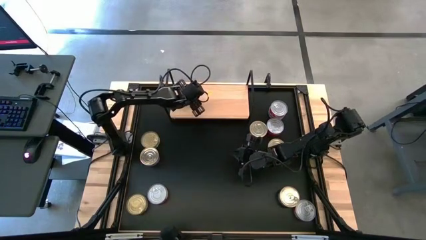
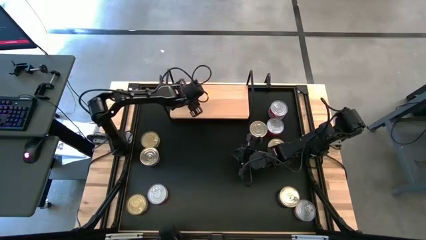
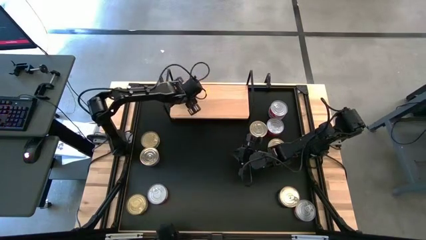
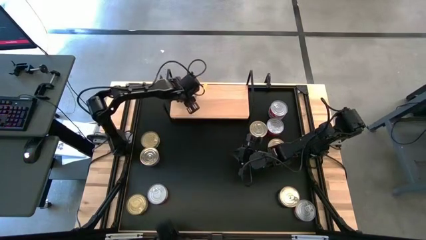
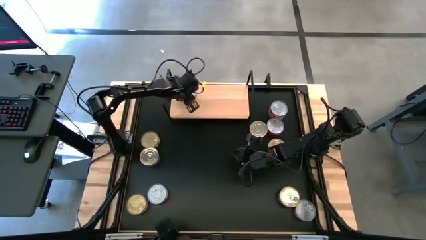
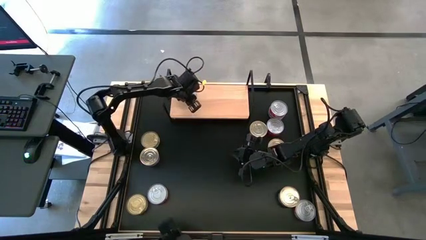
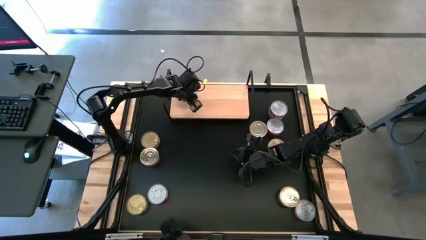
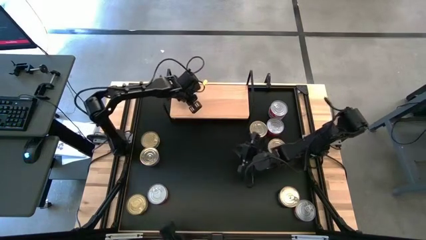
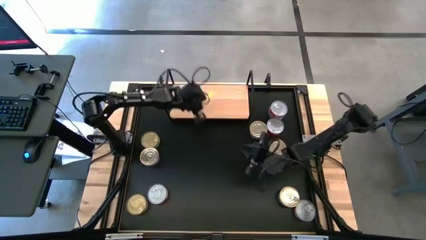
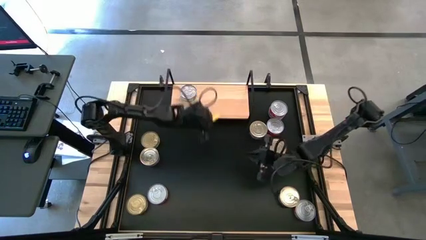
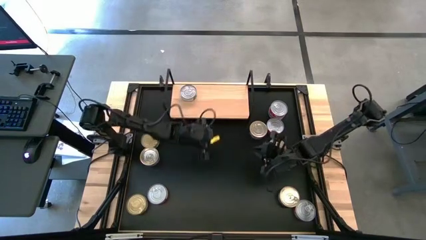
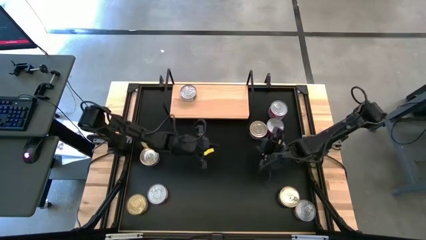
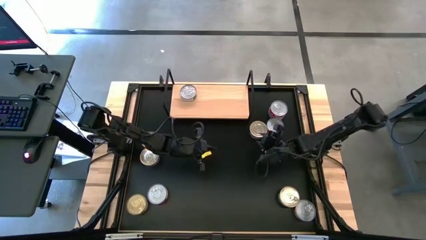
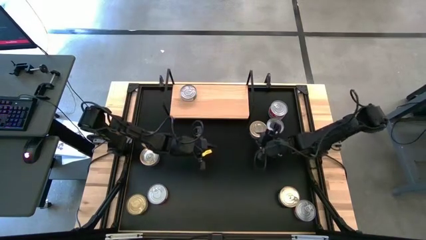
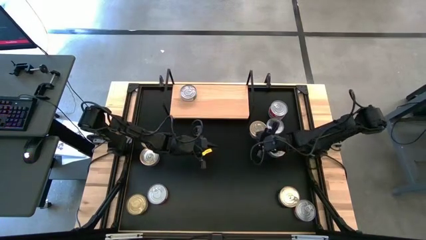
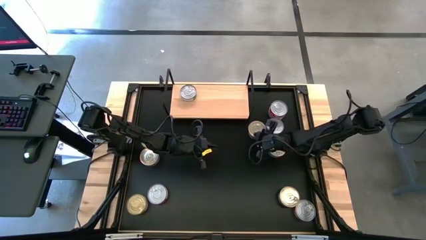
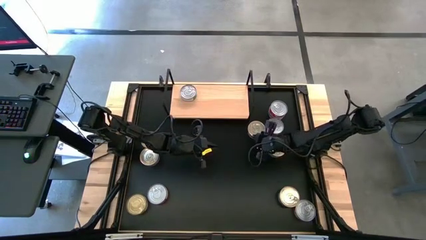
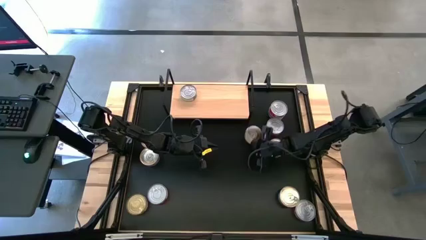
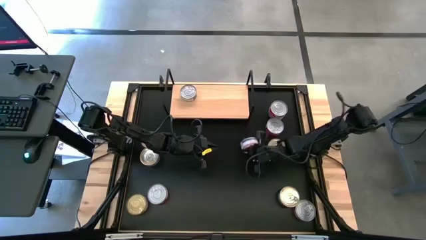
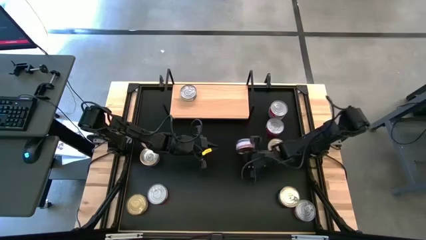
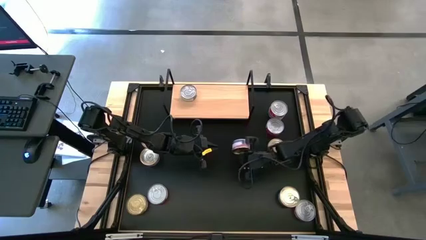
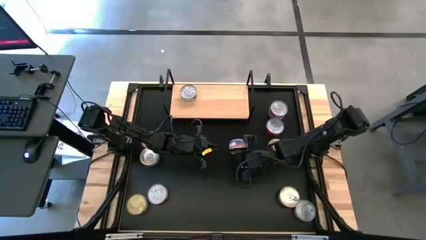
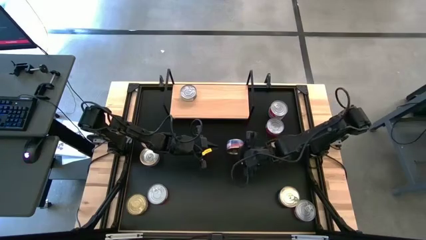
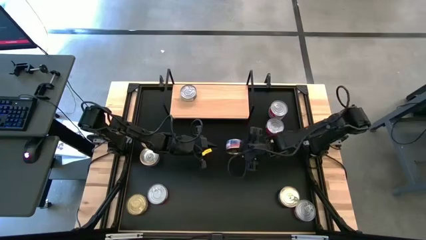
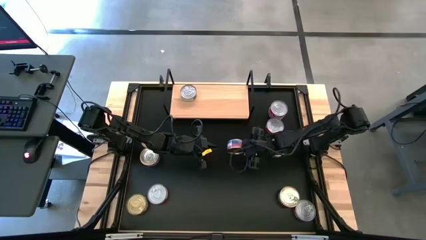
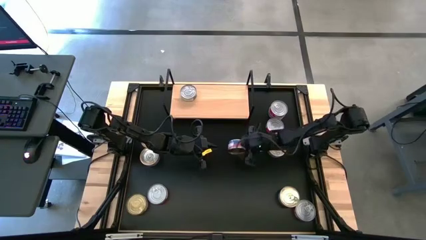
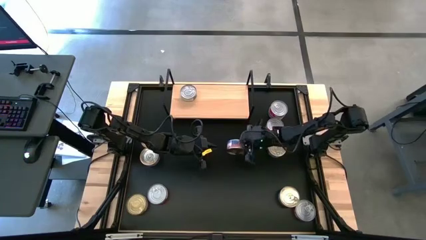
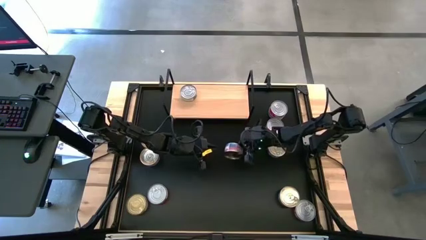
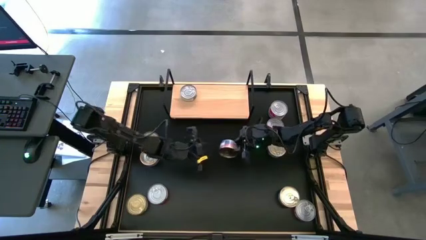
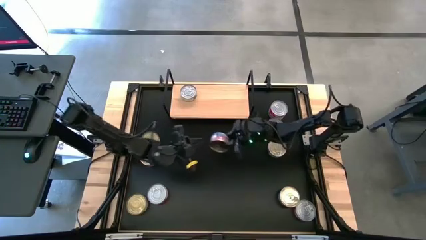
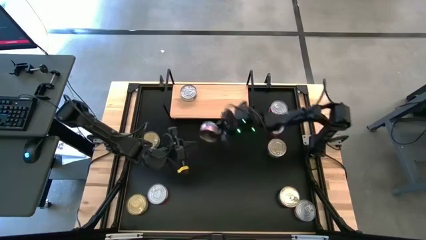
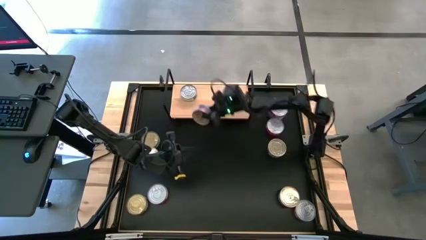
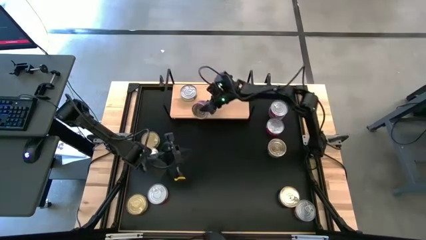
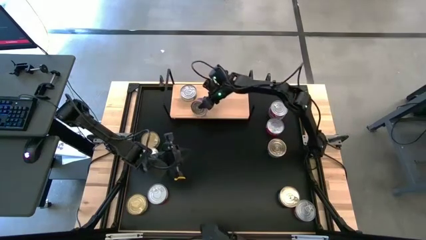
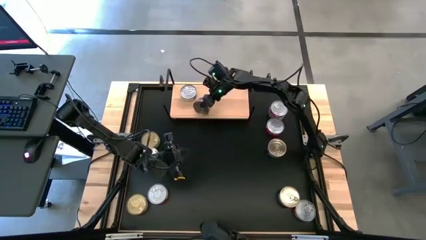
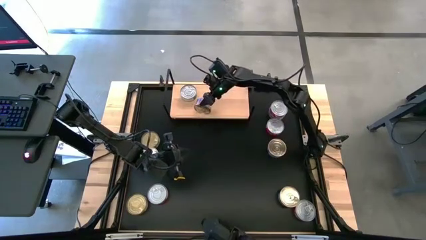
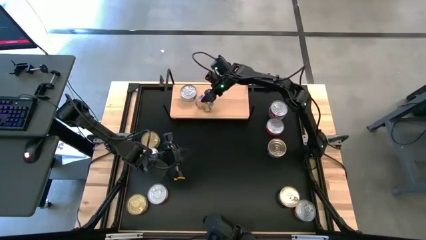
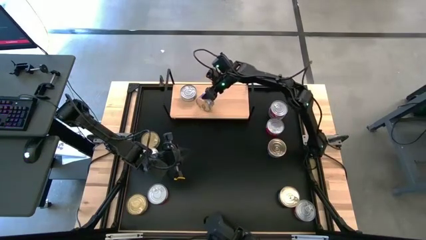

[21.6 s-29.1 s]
Task: Stack canned seafood by type on shelf
Put the blue-pink tuna can on the shelf

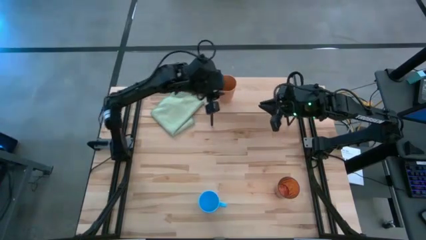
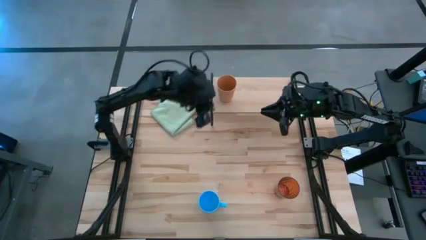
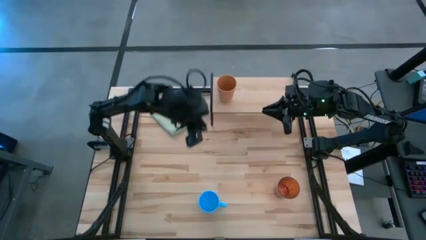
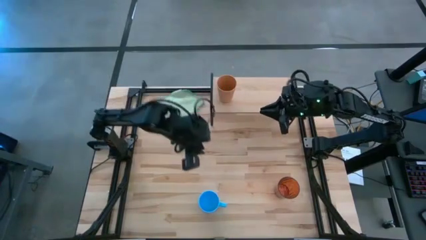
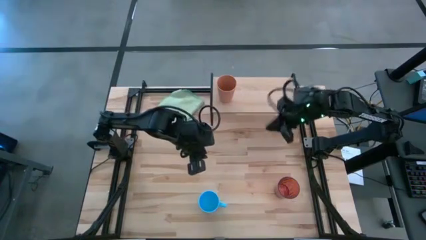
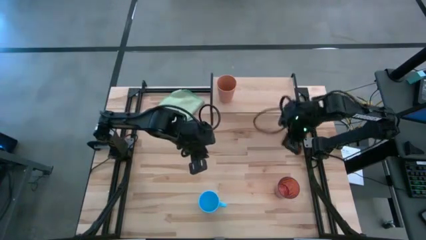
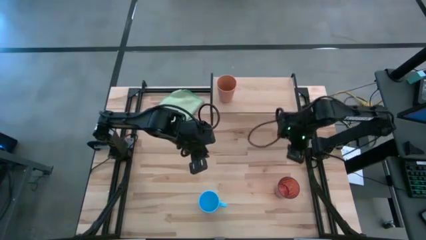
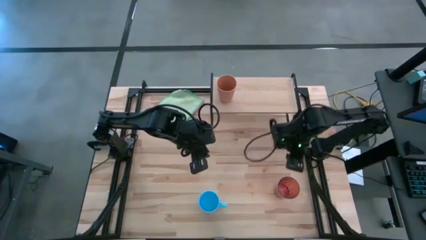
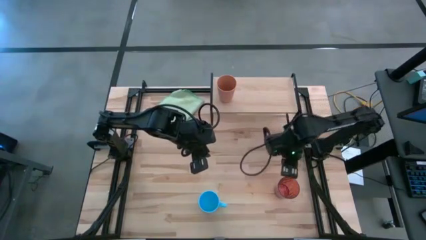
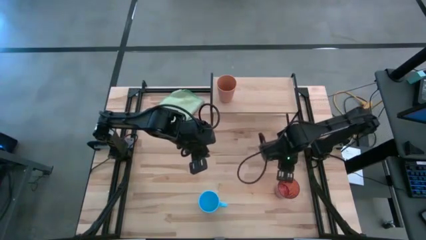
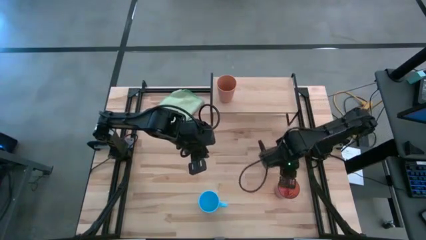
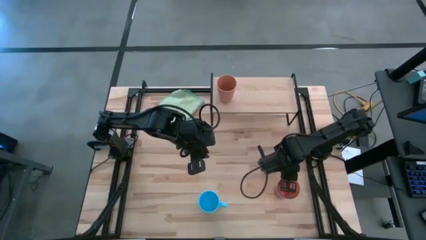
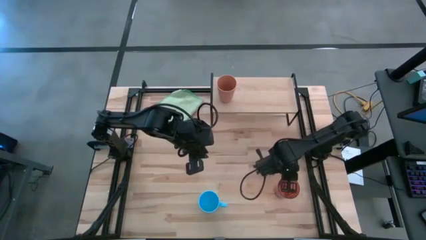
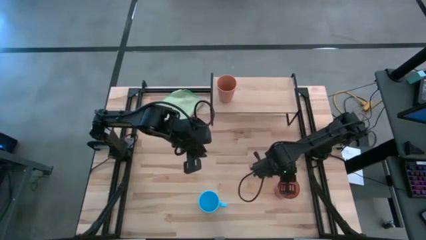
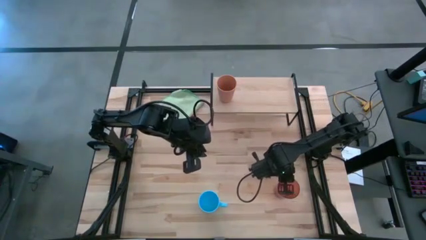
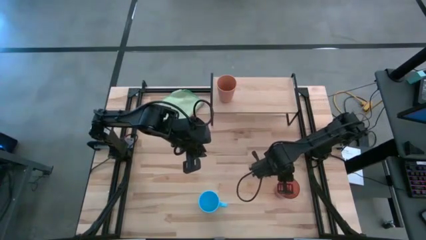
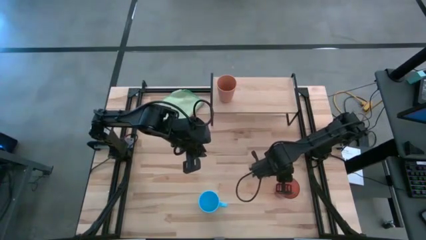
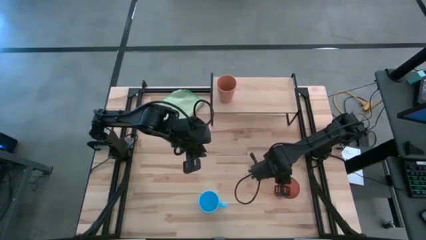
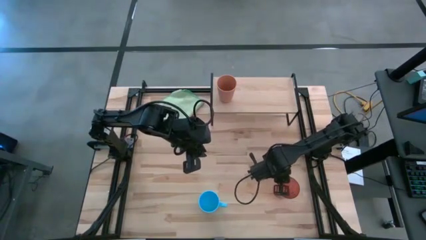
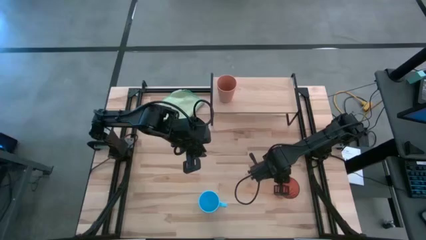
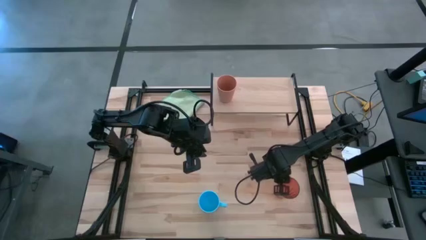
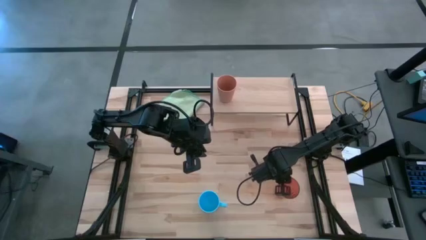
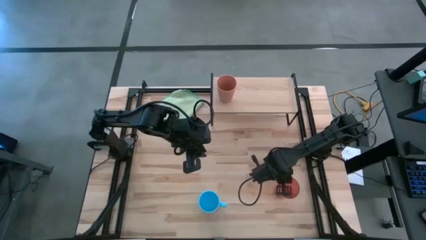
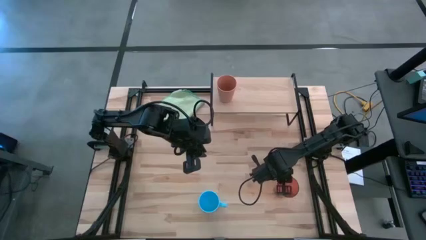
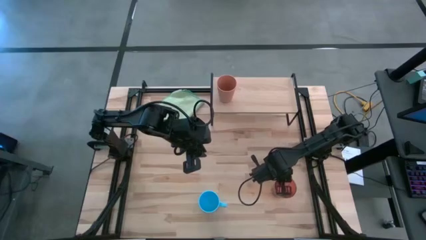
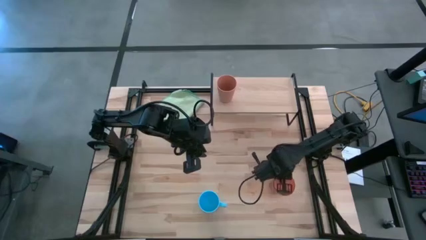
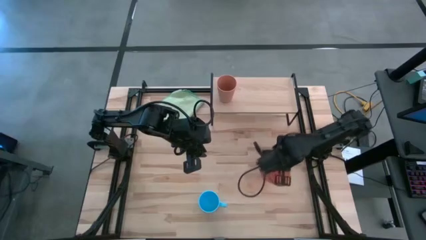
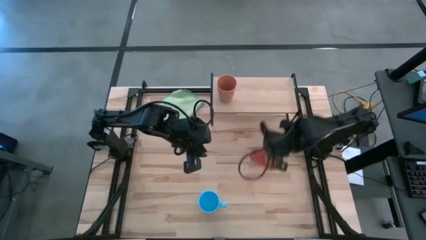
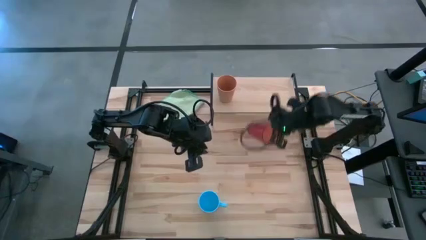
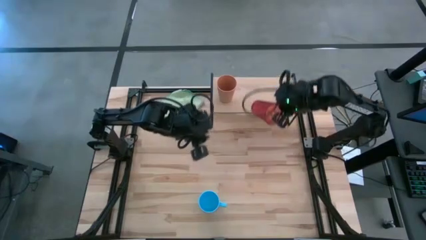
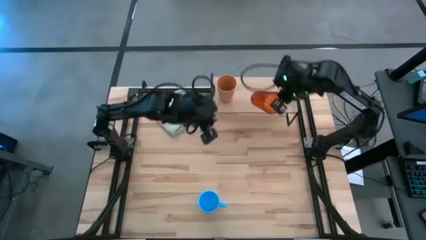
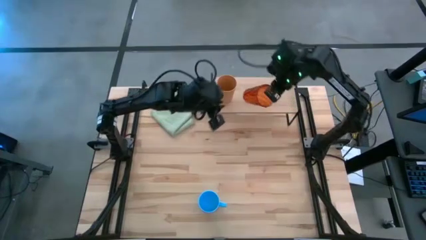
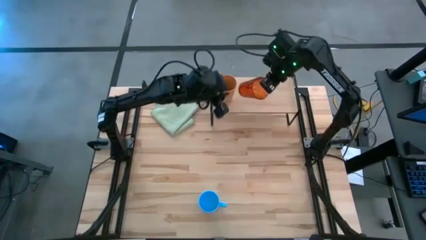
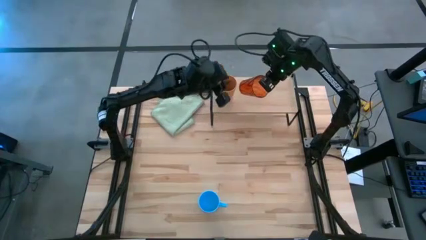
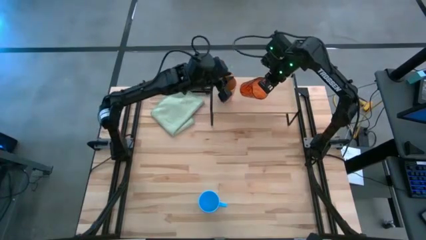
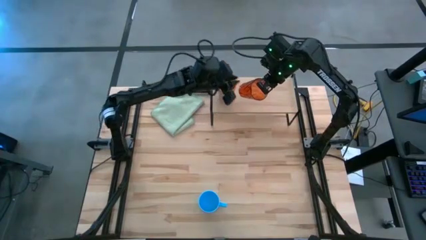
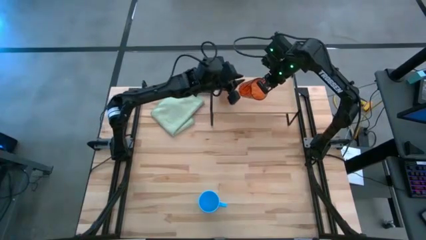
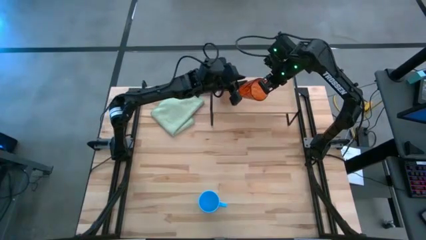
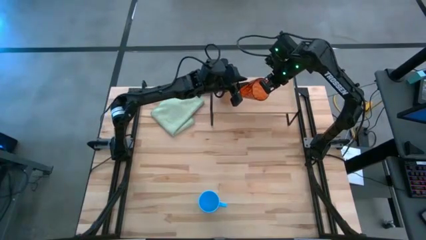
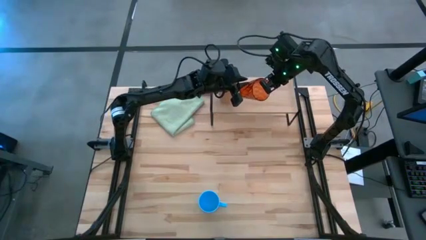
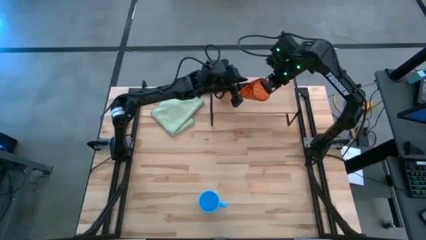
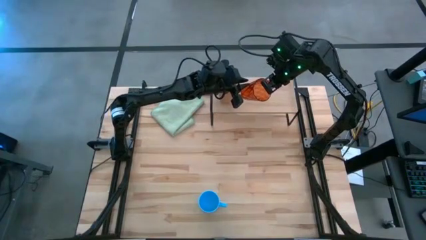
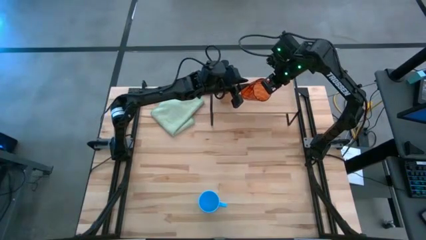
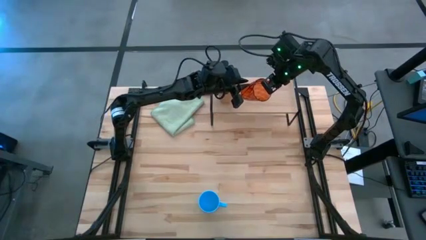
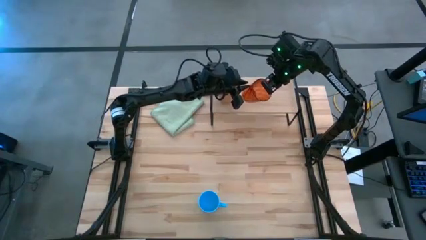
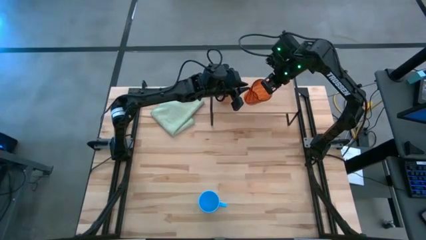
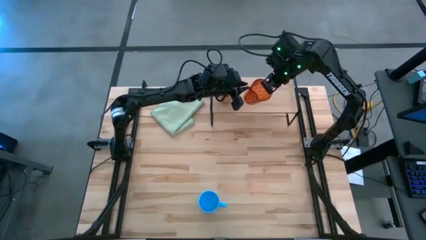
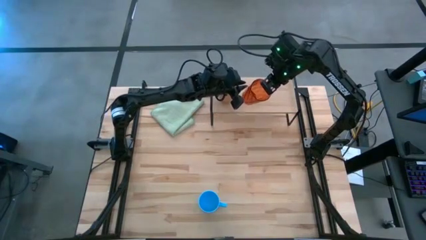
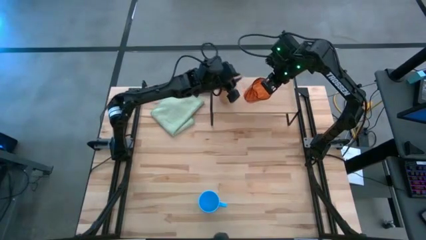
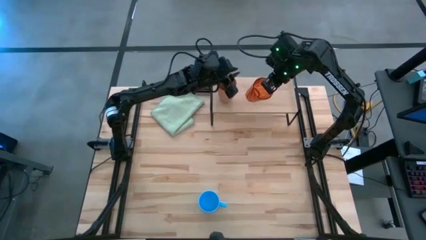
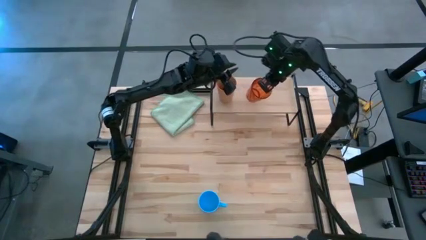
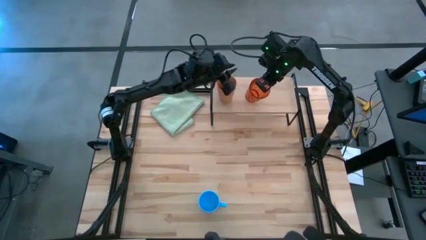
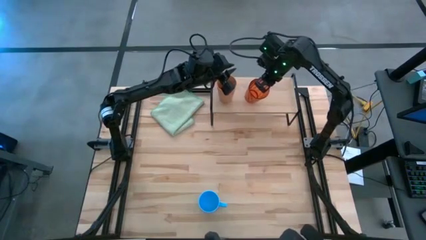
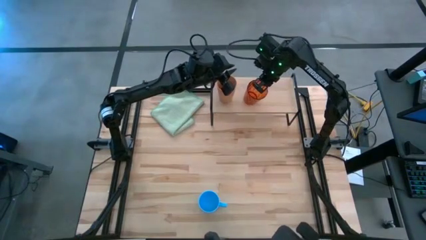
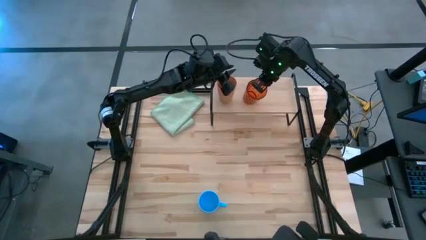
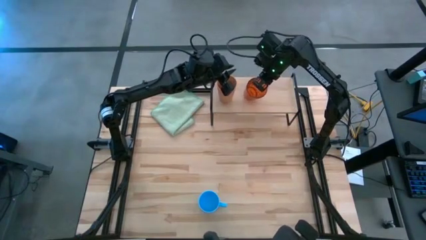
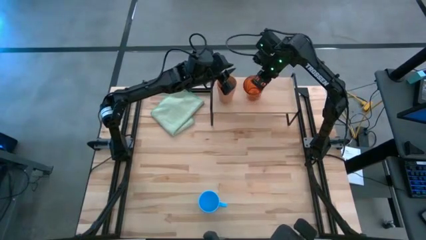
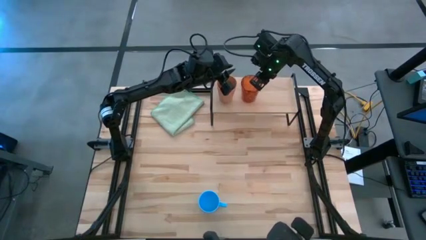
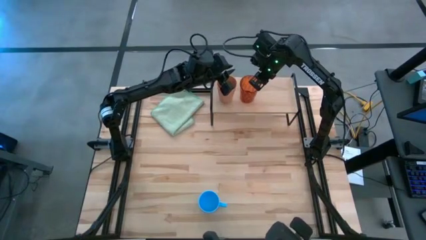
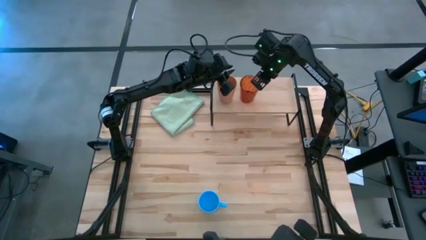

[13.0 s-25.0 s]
Task: Stack small to large cups/mugs on shelf
Put the brown cup on the shelf
